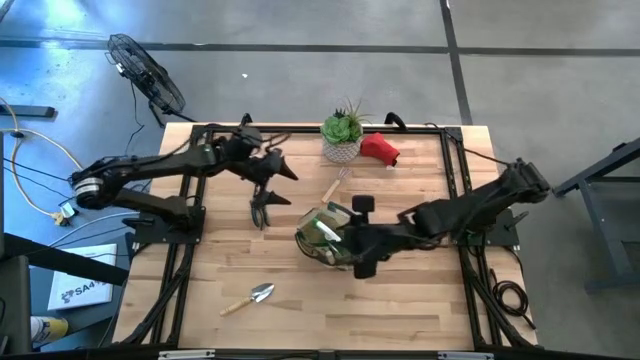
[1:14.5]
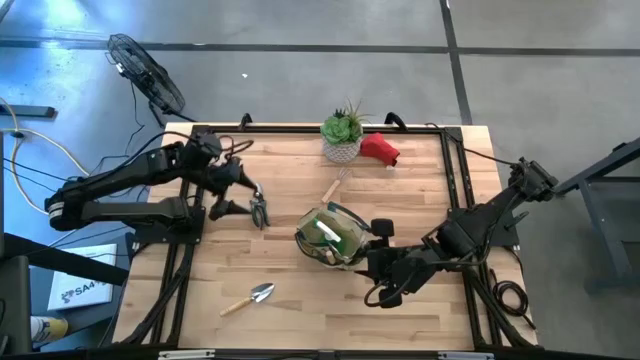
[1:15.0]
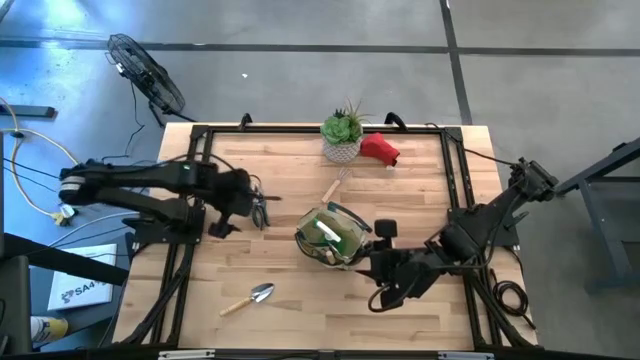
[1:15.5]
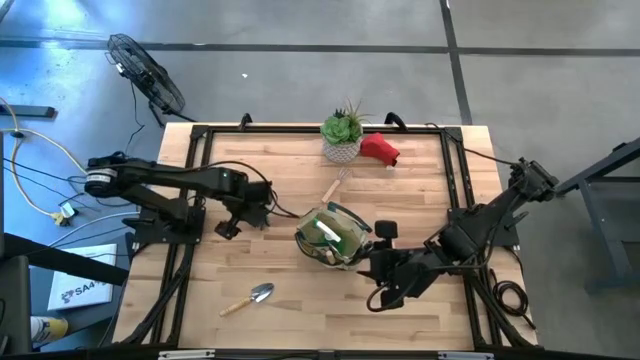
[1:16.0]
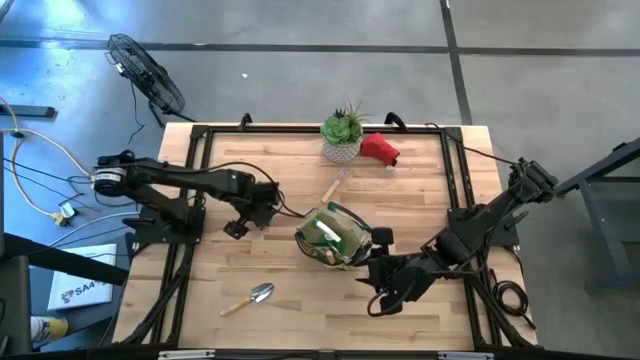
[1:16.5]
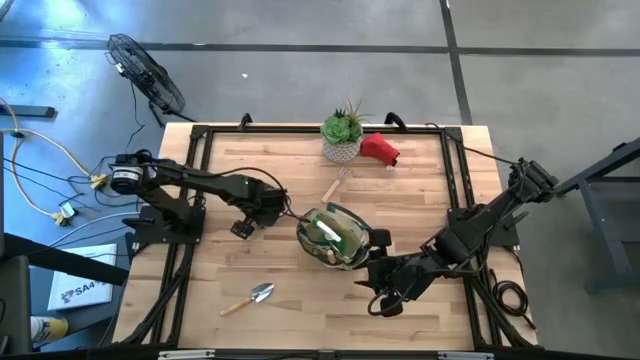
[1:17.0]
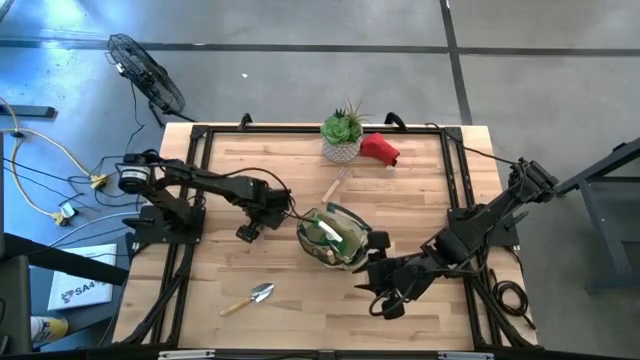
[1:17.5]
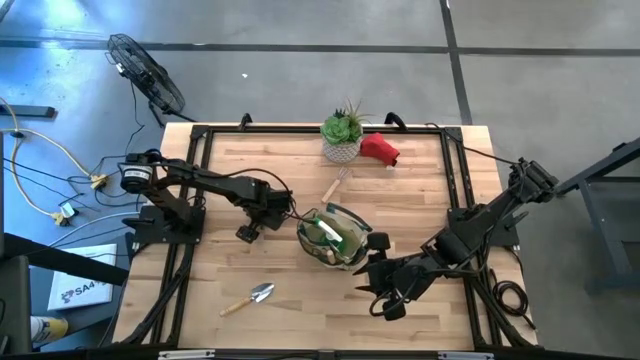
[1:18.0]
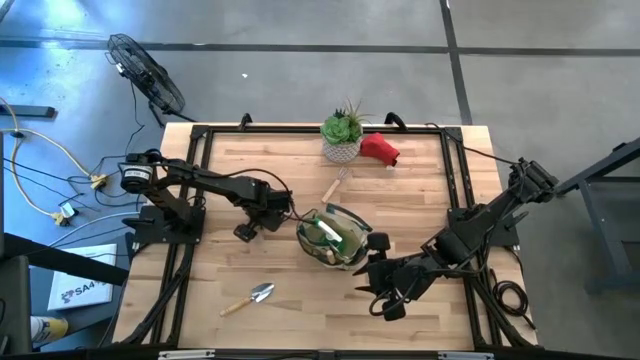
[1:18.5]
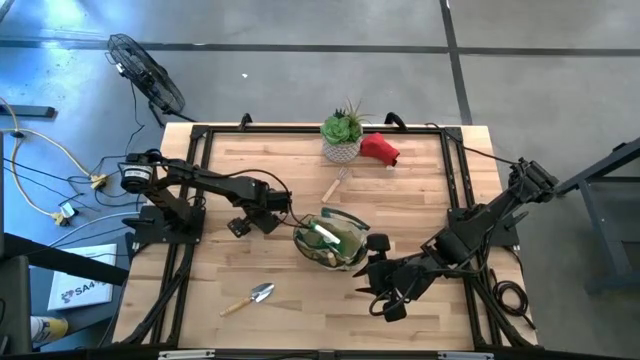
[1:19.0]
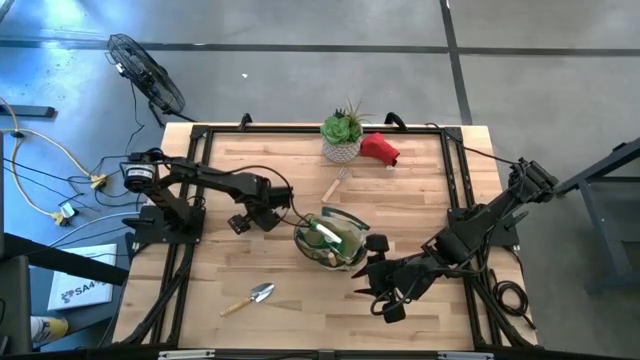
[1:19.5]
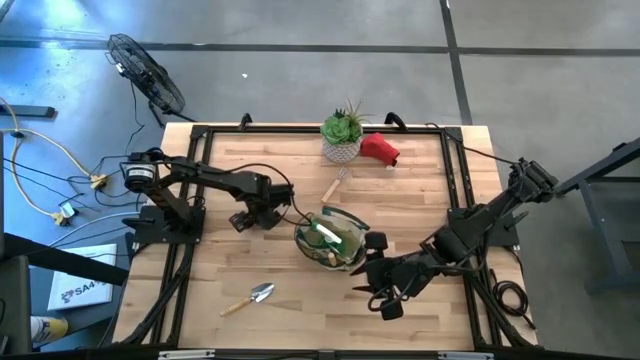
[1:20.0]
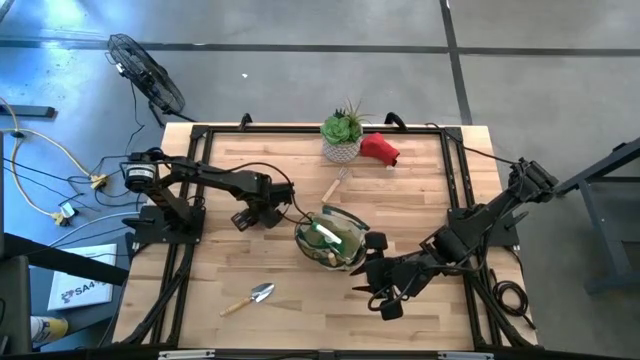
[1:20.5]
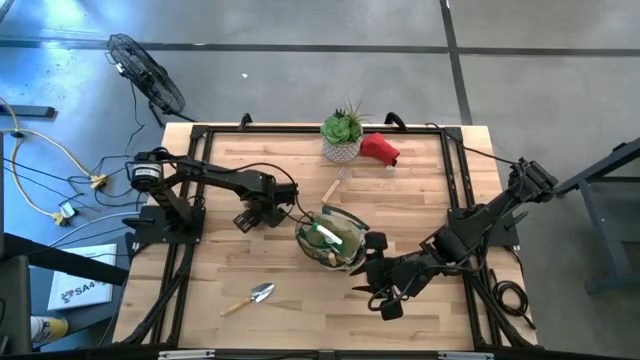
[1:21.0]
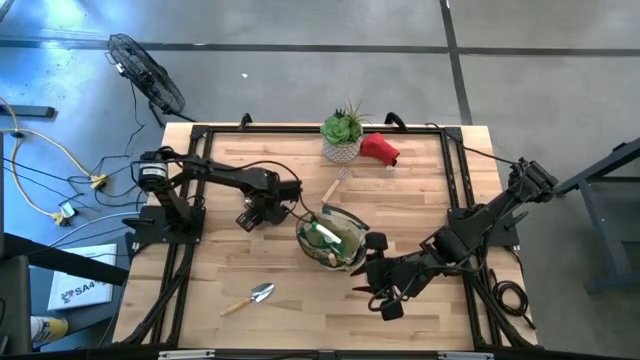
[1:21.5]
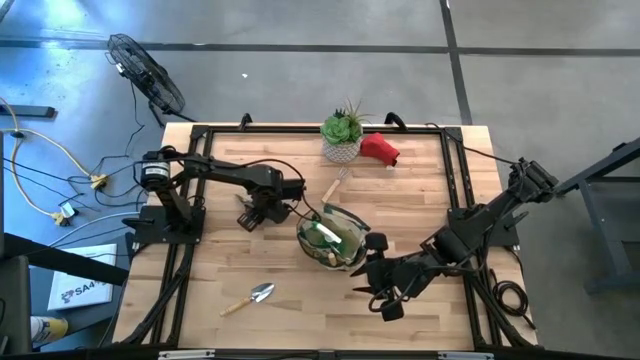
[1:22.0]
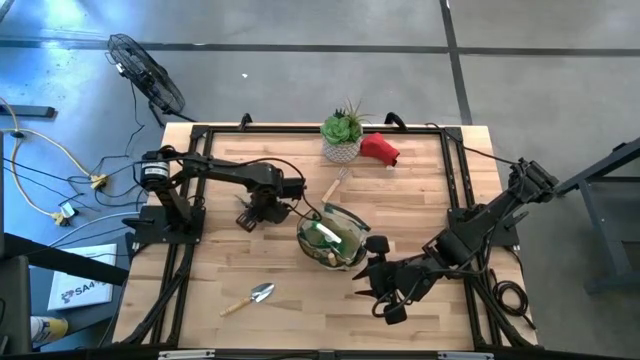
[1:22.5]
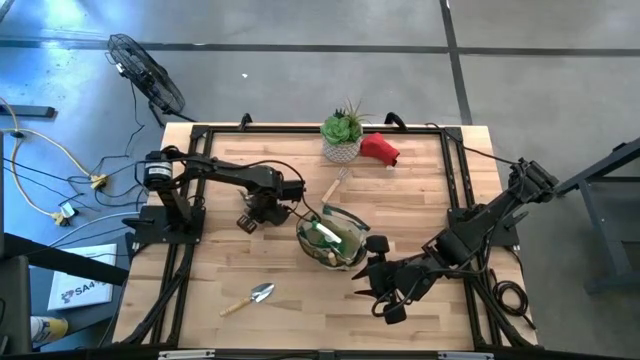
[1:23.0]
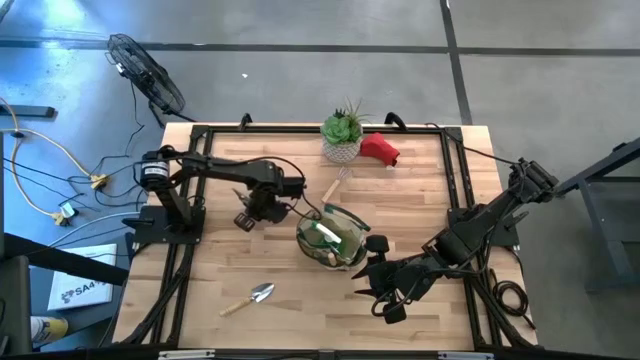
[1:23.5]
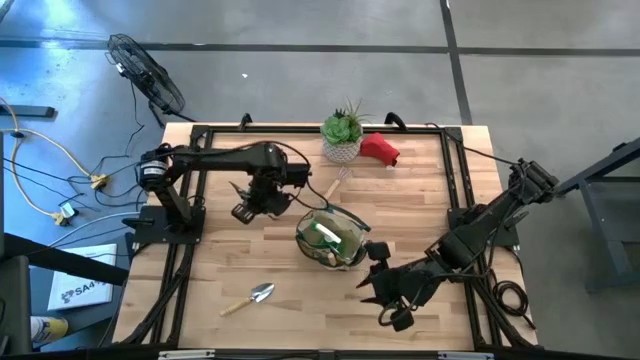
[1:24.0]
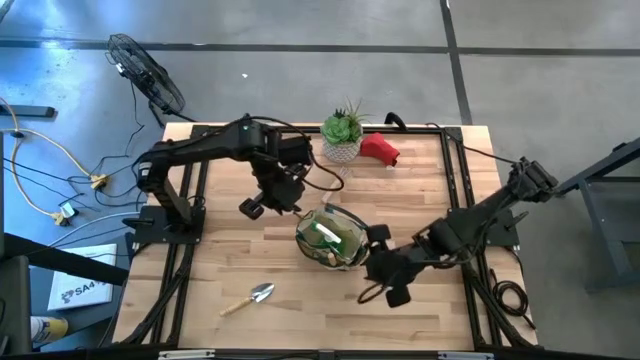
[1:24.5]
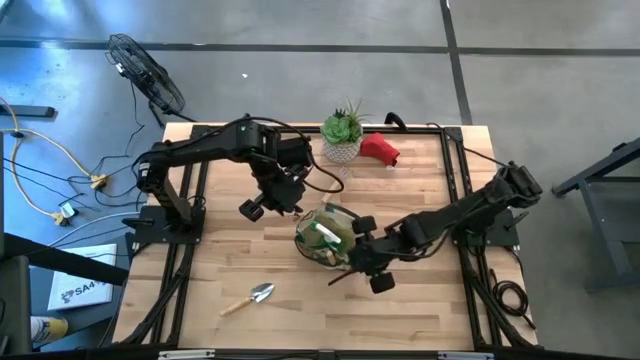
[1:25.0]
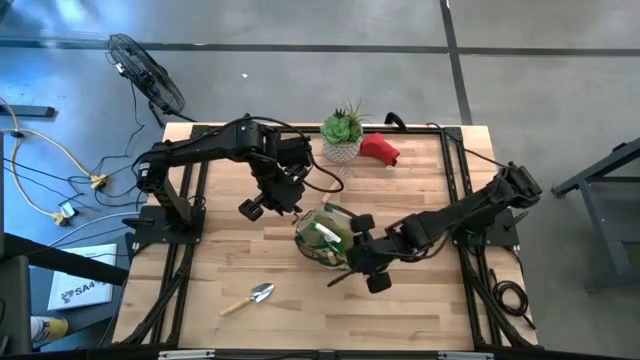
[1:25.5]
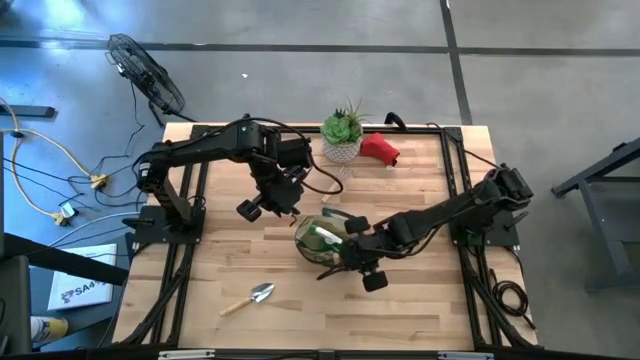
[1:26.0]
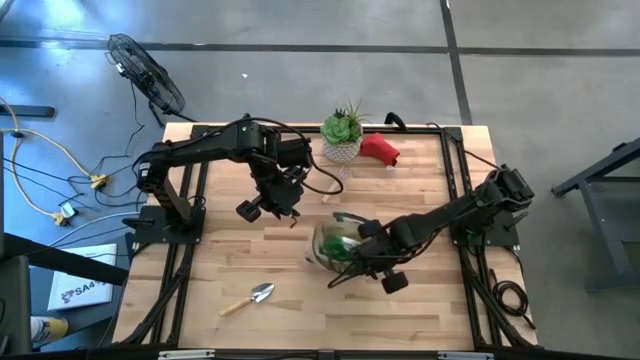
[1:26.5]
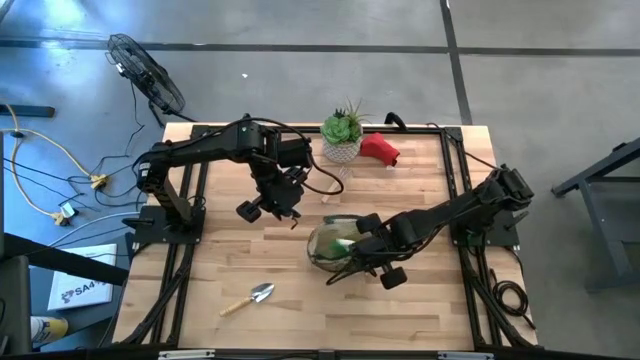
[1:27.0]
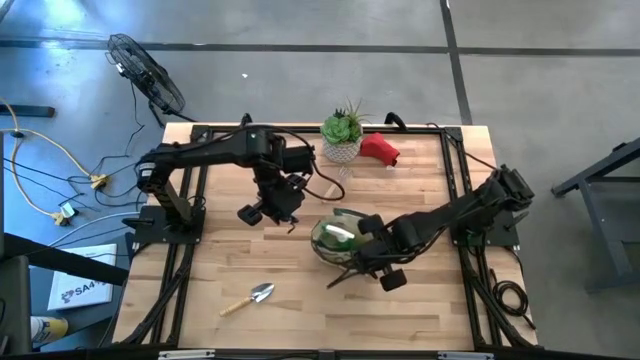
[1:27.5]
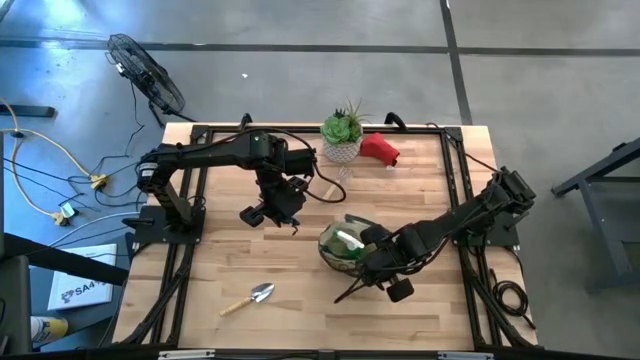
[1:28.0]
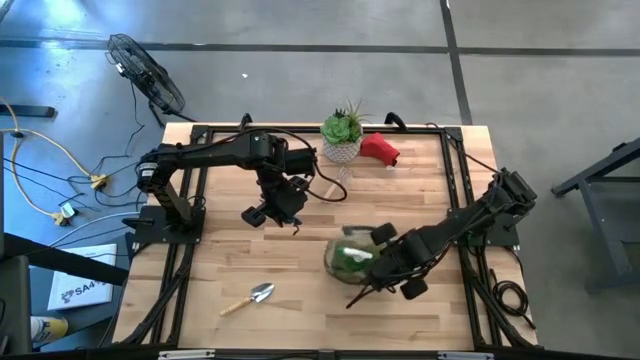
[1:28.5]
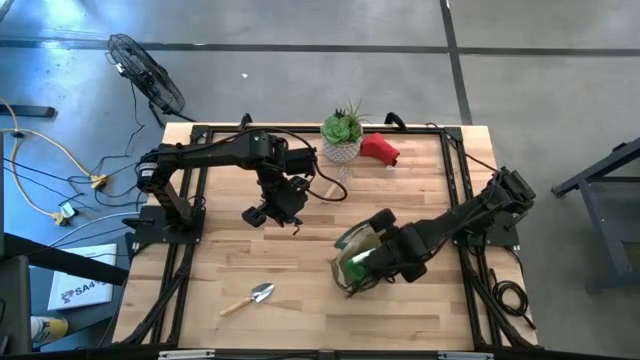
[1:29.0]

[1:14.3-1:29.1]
Task: Pick & Place Garden tools in Gardening bag
Put the green shear scissors into the gardening bag

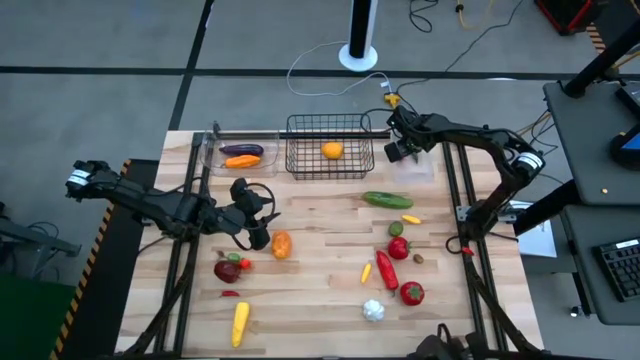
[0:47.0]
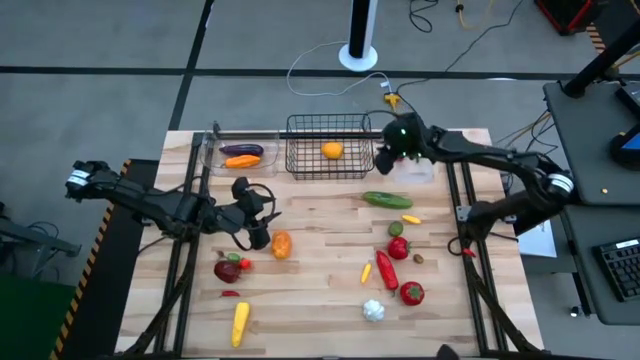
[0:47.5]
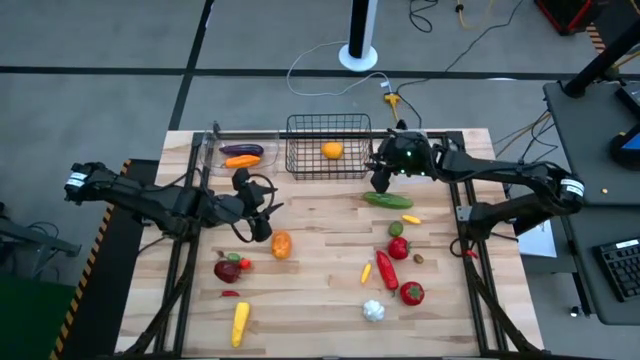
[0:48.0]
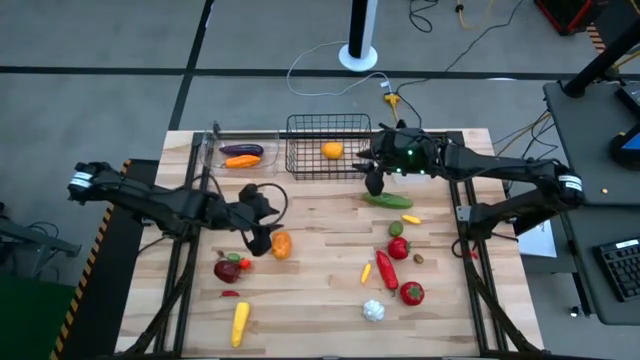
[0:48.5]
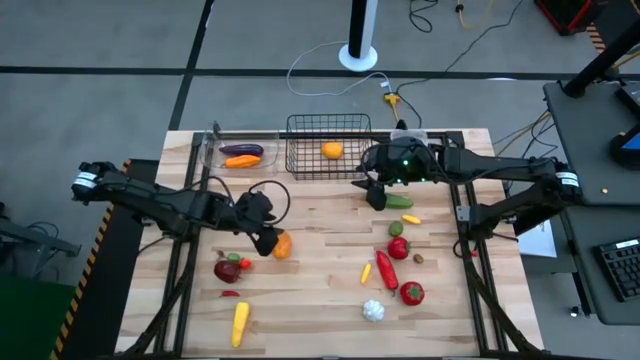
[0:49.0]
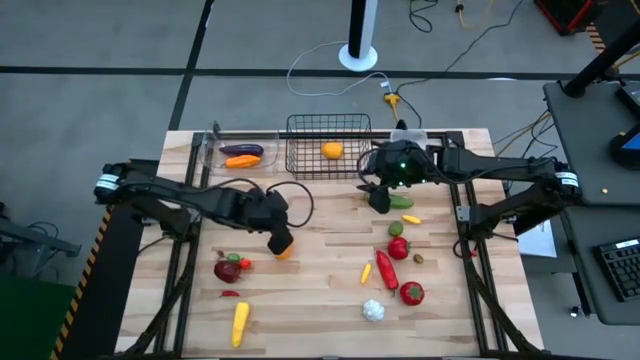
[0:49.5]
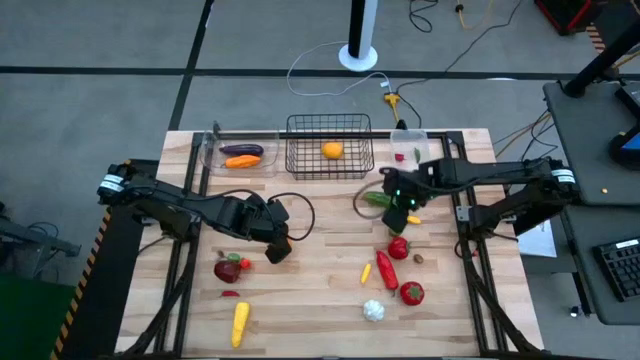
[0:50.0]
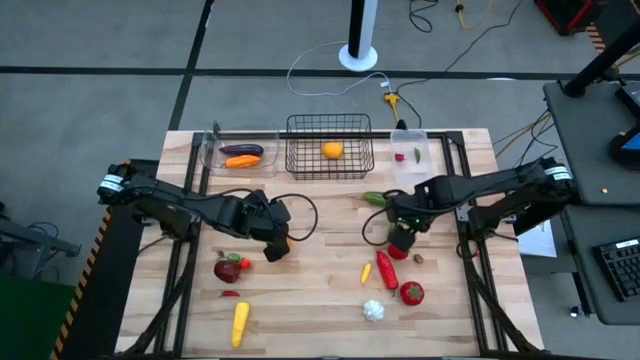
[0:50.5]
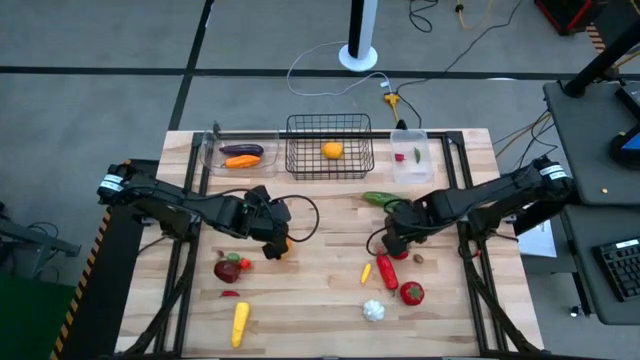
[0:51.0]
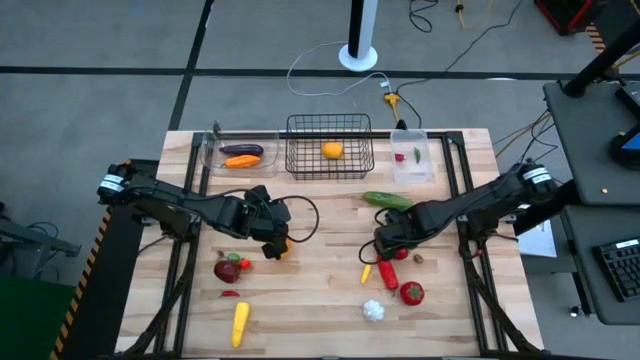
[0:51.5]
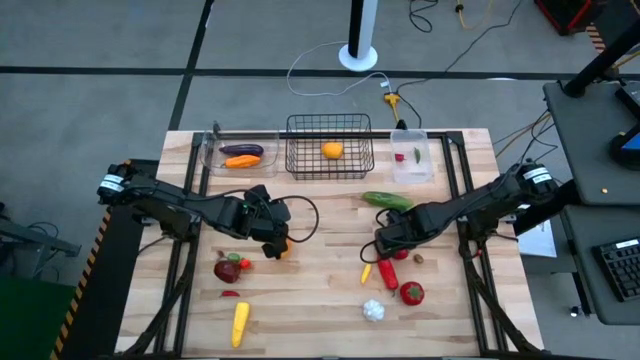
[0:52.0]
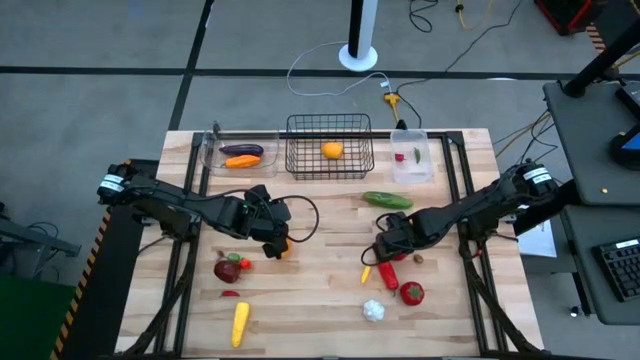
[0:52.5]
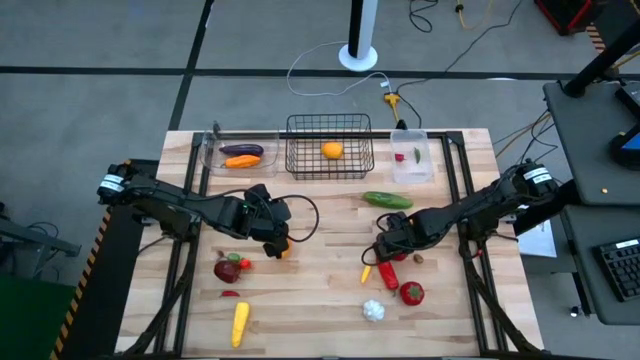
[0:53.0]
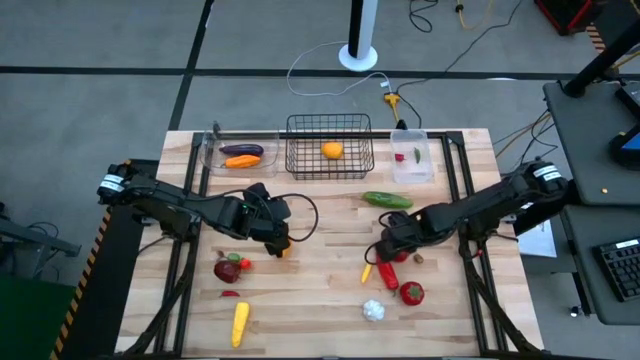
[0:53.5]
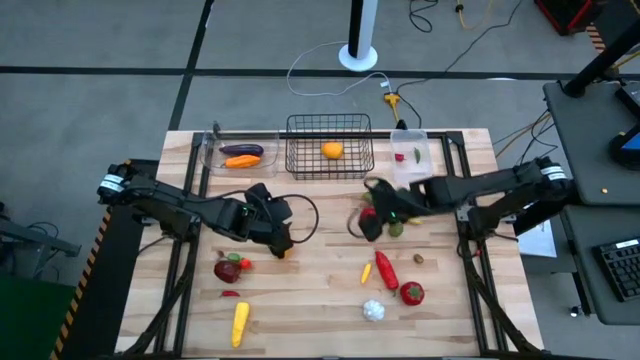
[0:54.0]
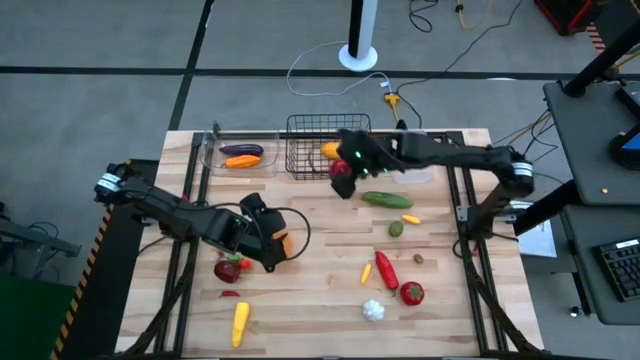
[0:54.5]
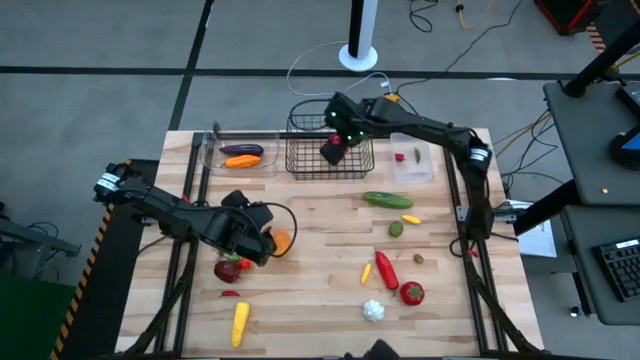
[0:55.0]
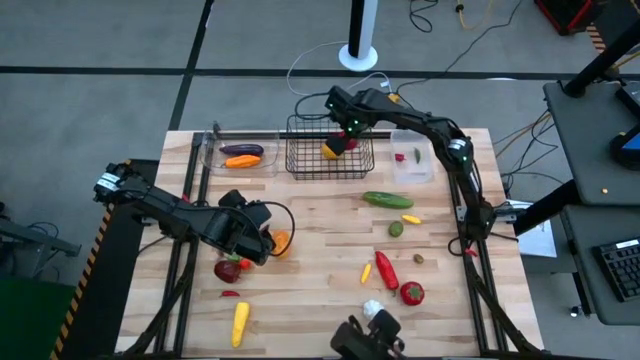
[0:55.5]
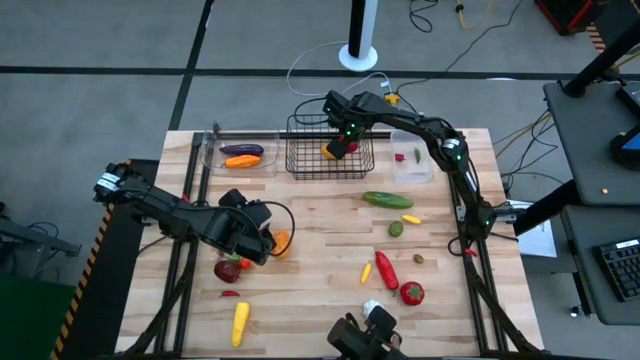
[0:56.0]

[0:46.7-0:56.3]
Task: Sort produce into baskets
Put the top tomato into the wire basket
